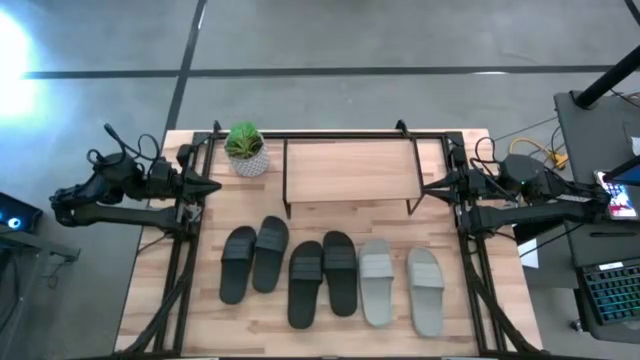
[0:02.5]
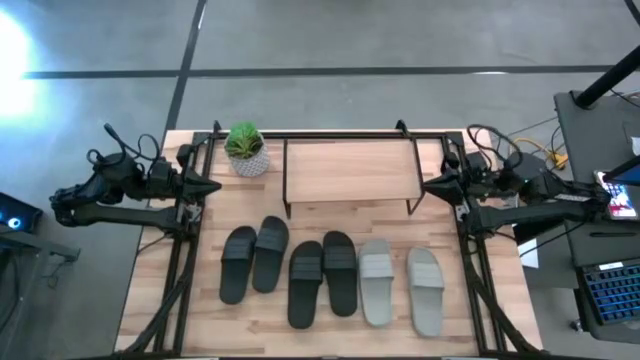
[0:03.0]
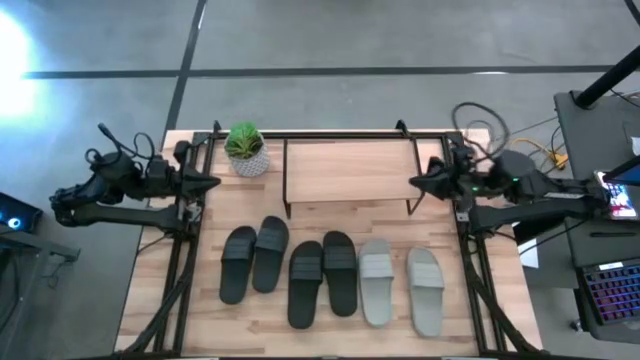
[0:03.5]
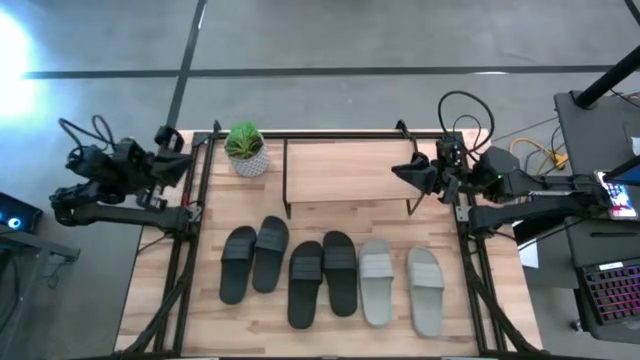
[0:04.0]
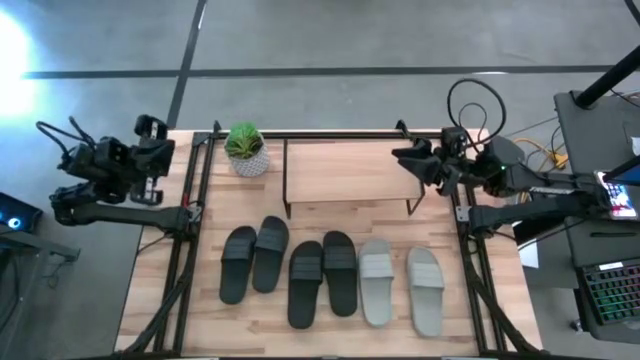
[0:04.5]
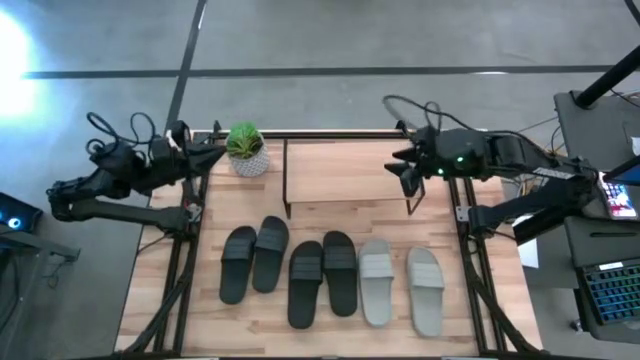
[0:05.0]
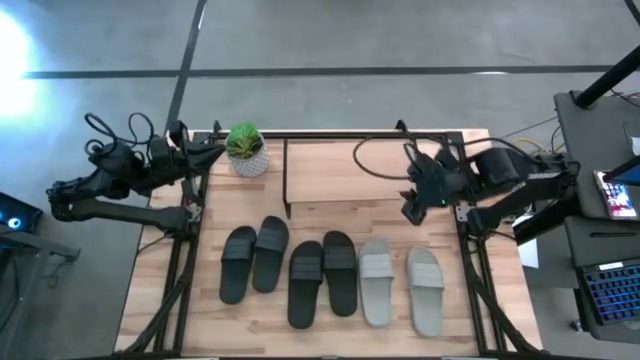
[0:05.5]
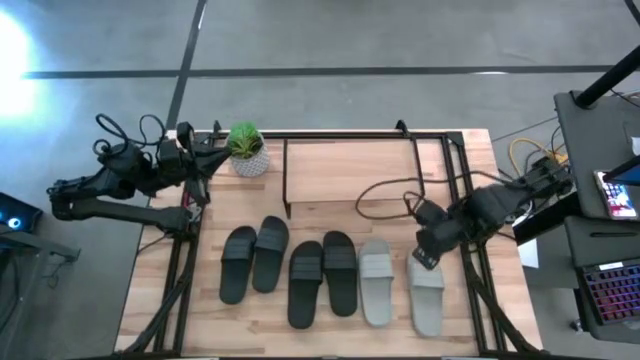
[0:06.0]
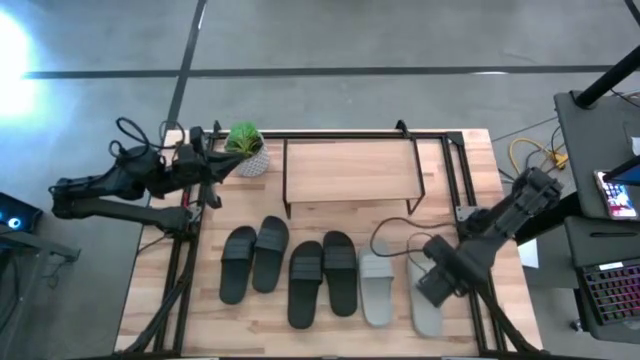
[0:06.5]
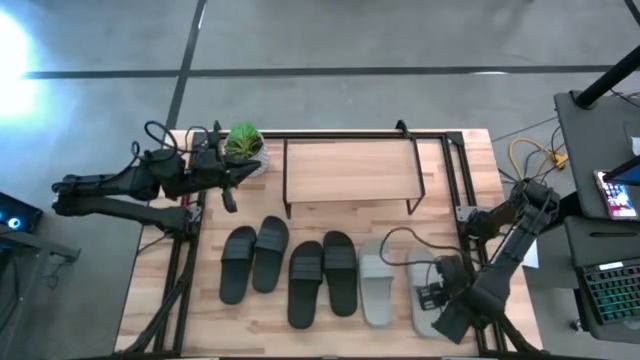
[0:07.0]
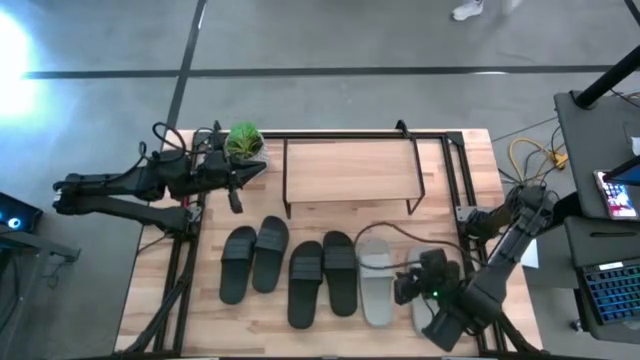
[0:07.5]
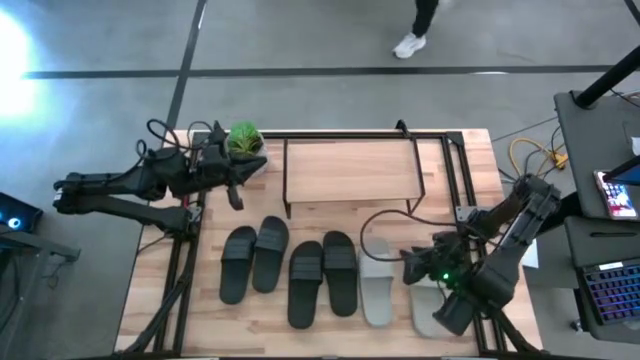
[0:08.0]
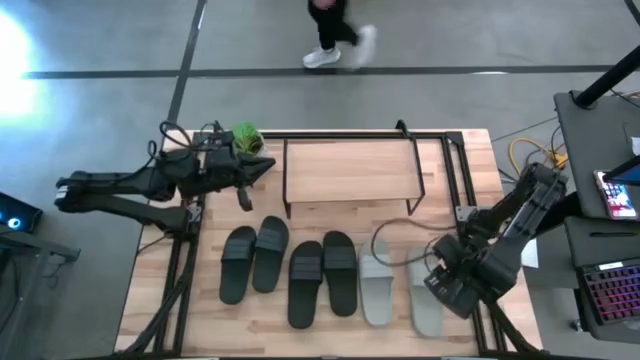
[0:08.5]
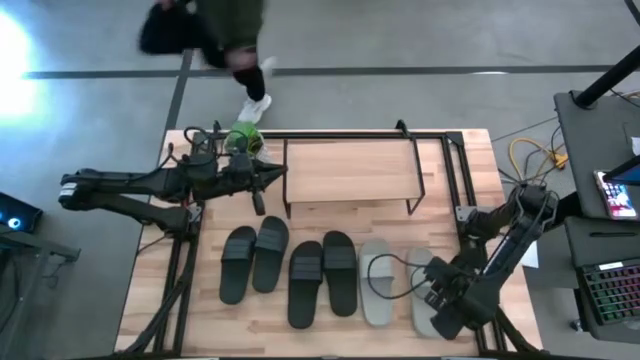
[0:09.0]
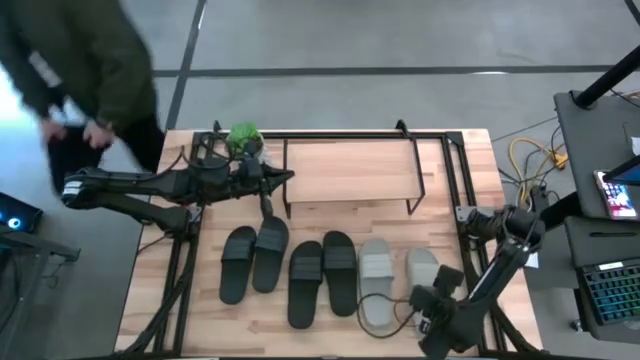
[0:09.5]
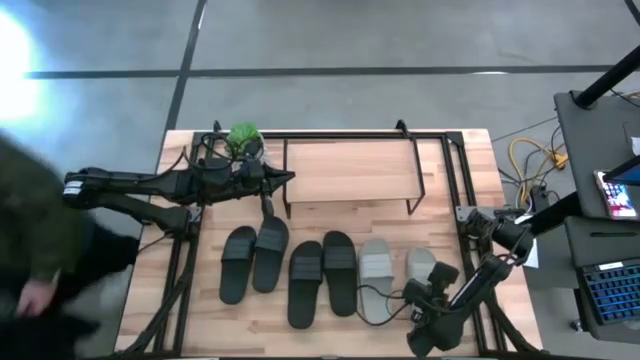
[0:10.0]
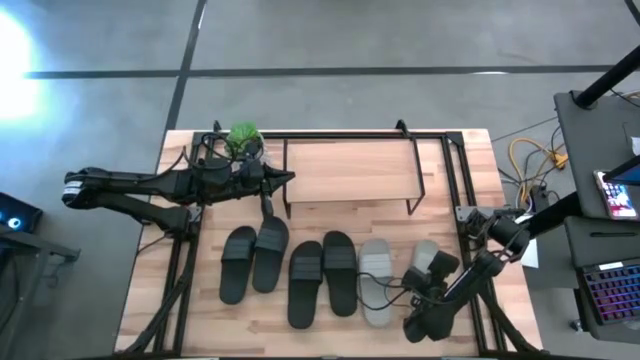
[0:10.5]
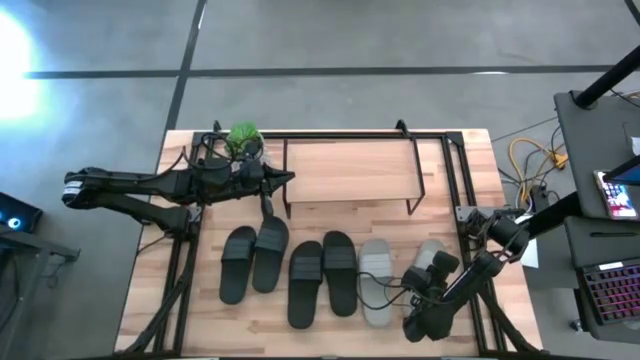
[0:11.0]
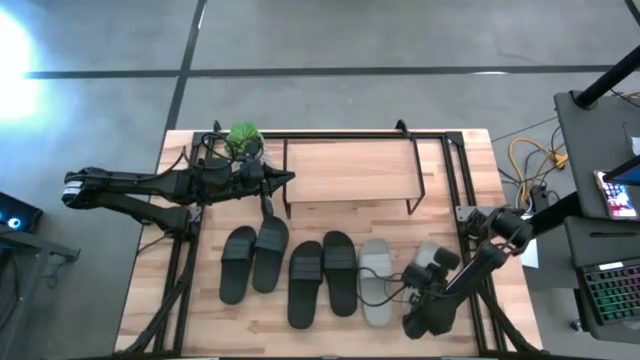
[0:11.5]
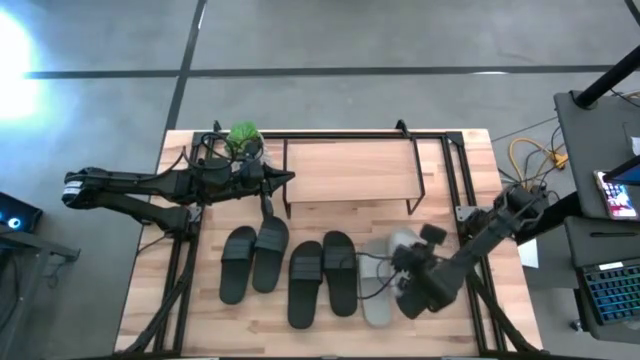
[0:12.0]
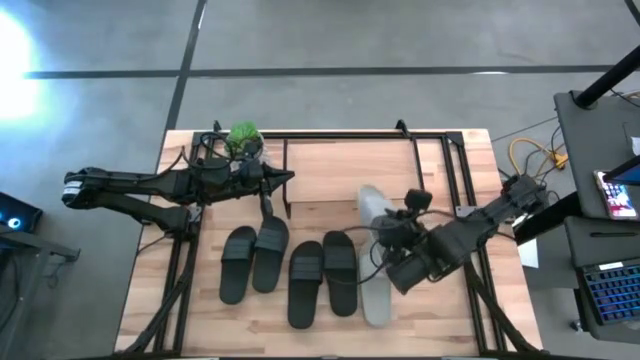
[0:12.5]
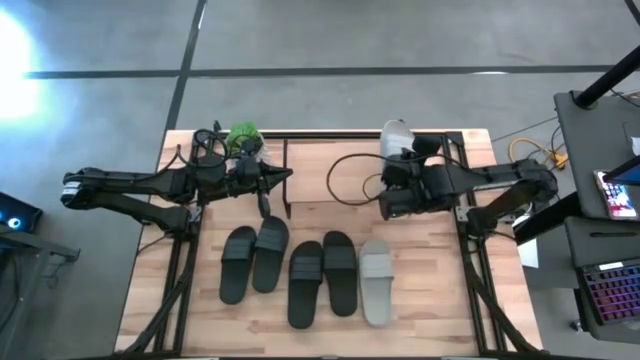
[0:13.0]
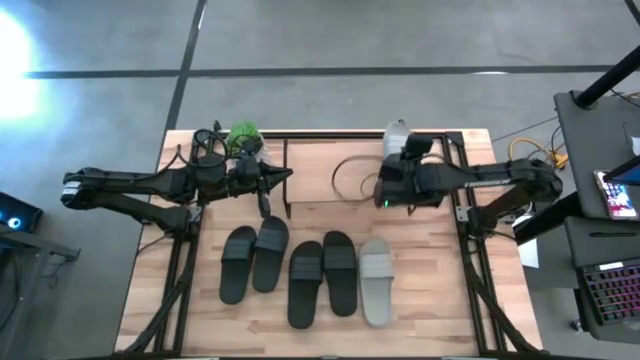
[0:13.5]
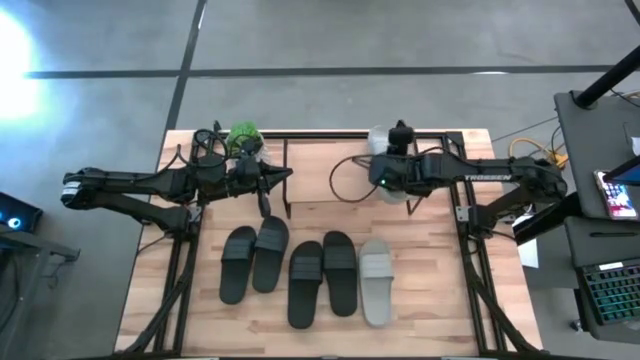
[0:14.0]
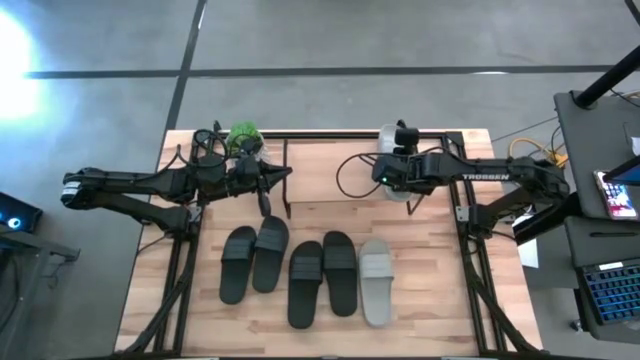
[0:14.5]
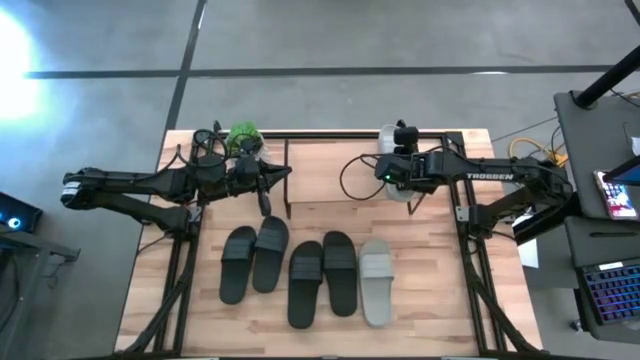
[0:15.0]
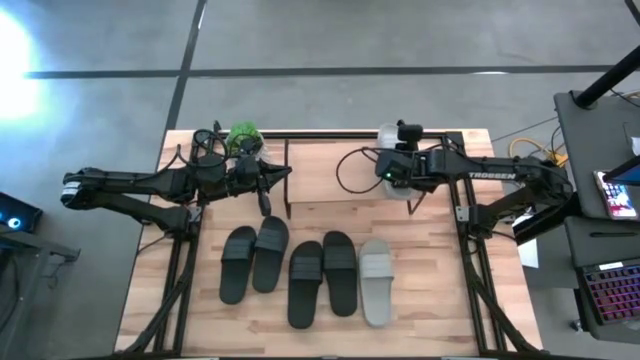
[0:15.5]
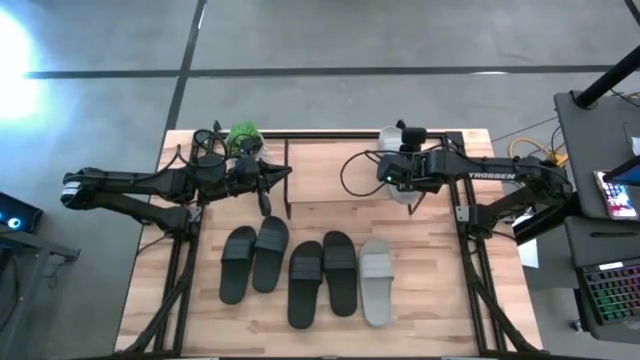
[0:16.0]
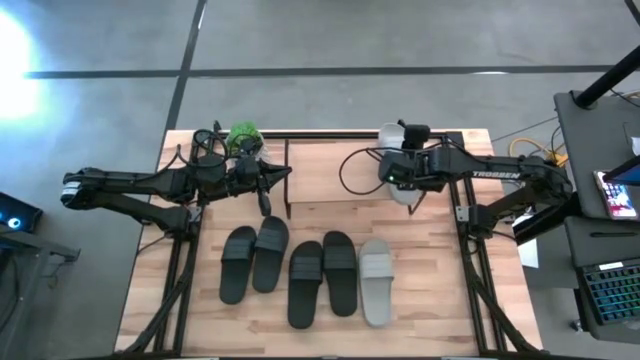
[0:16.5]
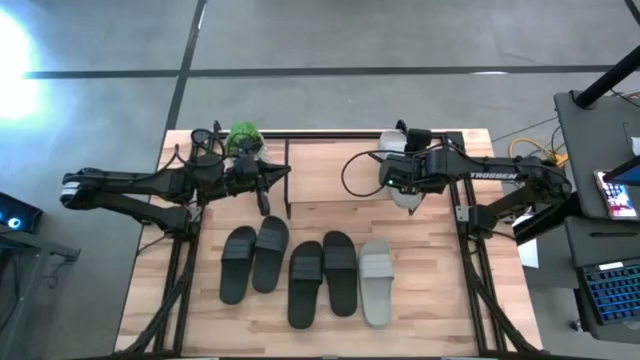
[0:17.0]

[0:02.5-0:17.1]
Task: Pick and place slides into the shelf
Put the gray slide on the shelf
